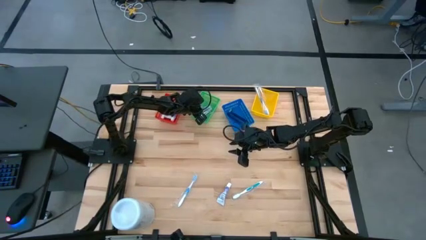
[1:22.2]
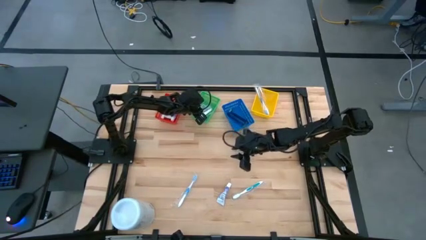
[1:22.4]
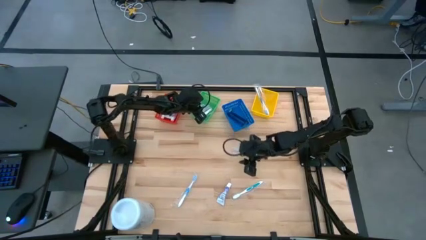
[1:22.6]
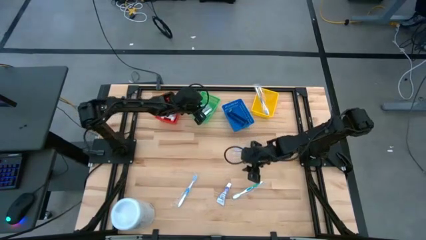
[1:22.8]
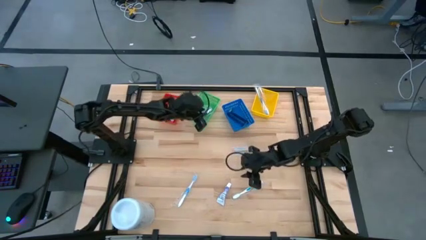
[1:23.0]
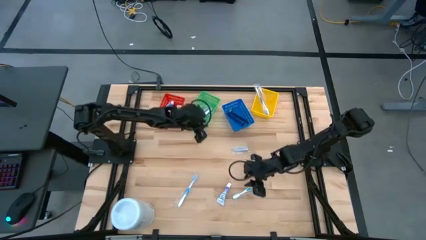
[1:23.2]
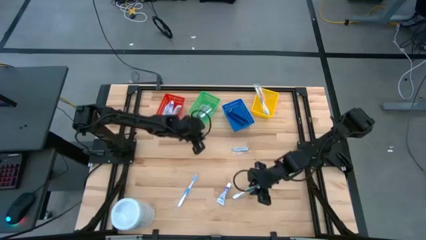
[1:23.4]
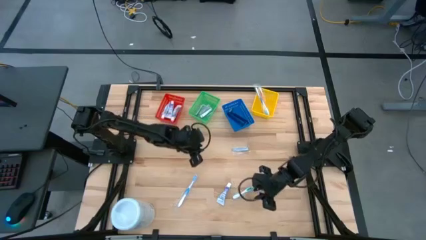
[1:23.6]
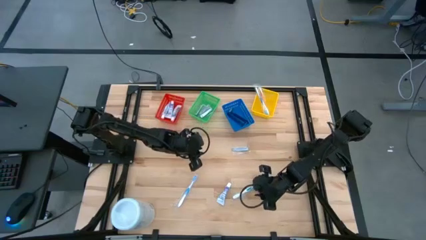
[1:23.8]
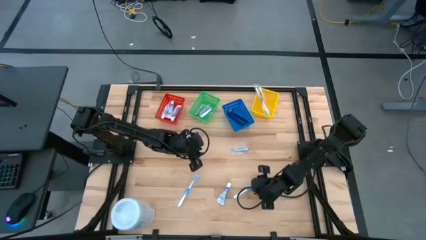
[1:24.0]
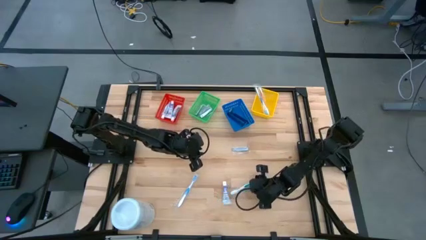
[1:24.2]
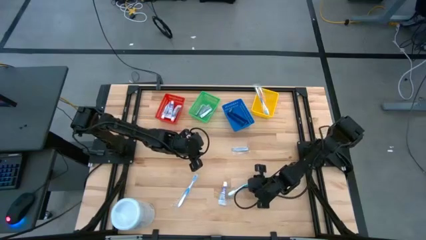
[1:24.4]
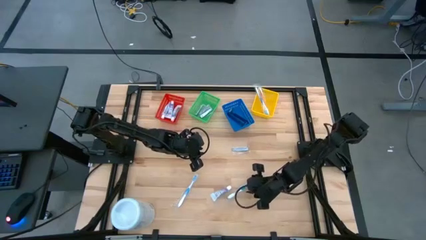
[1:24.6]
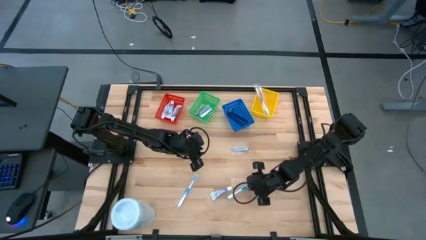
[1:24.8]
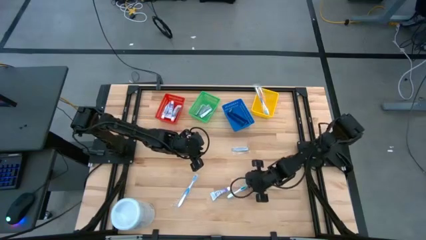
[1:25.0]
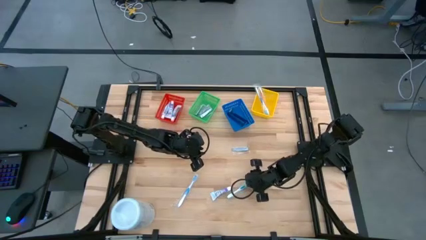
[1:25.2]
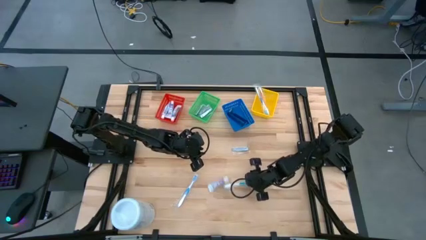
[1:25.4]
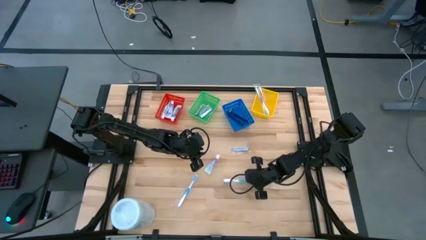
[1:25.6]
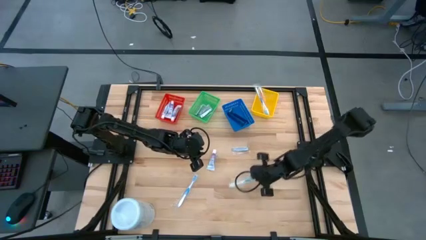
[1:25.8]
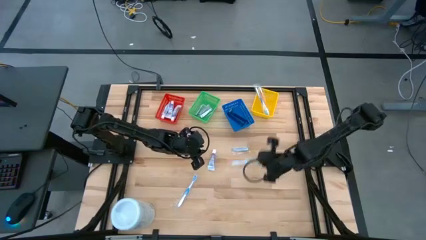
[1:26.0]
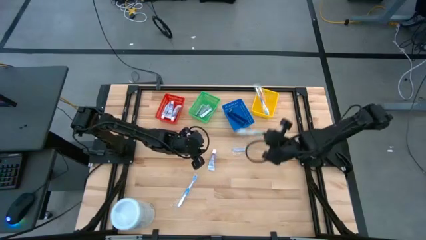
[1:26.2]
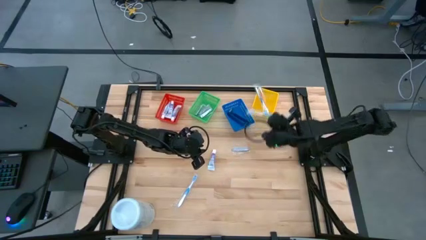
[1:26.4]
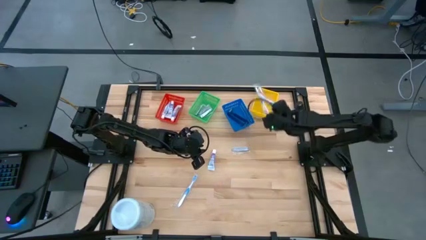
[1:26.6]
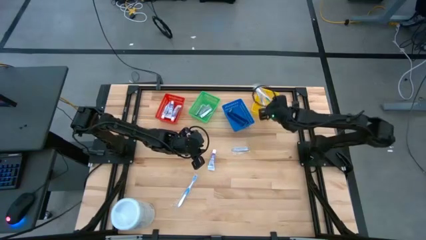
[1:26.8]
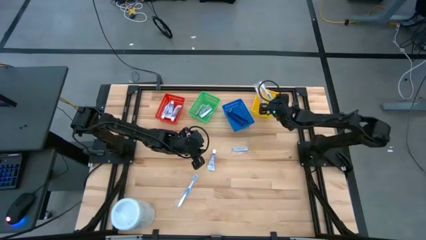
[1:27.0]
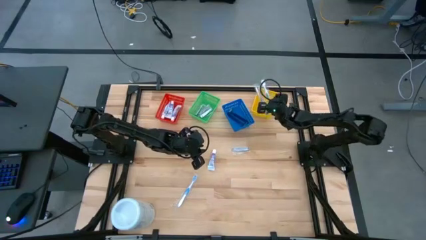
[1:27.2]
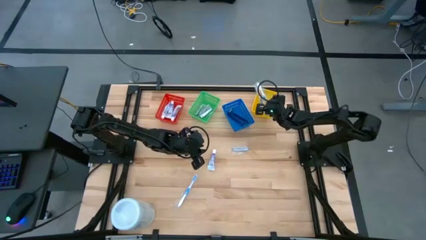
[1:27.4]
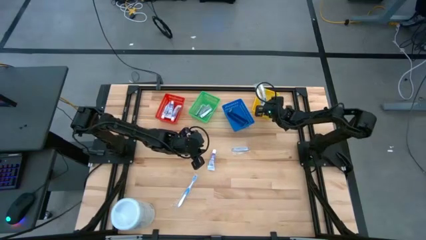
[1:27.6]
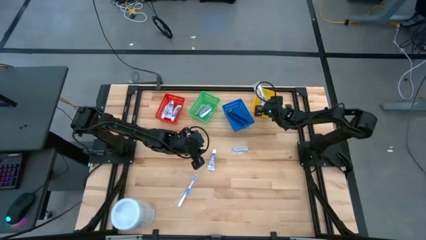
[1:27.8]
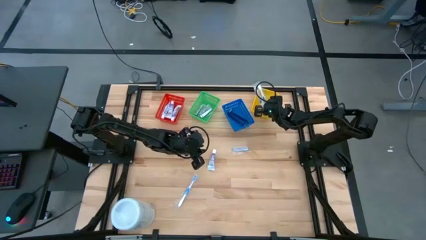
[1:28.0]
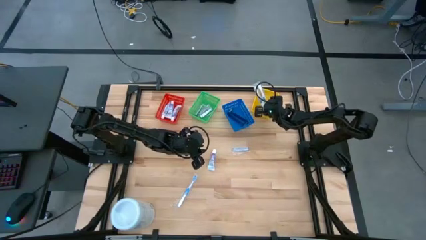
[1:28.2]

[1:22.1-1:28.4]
Task: Pick & Place Travel size toiletries
Put the light blue toothbrush in the yellow bin

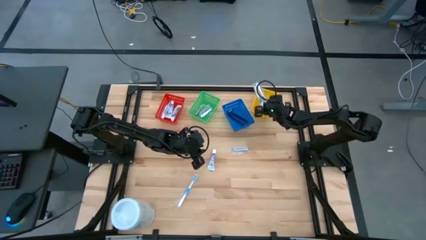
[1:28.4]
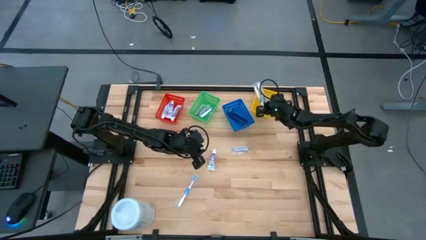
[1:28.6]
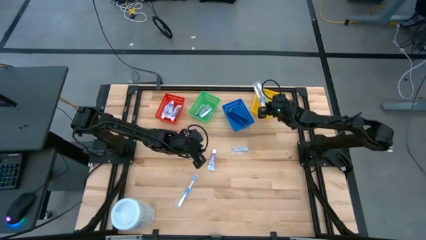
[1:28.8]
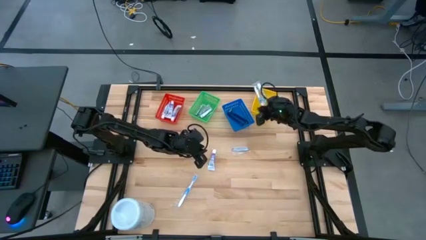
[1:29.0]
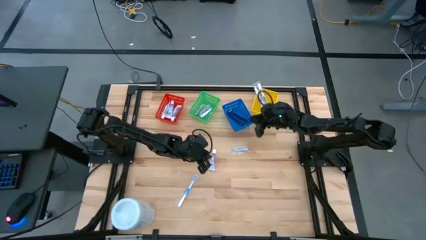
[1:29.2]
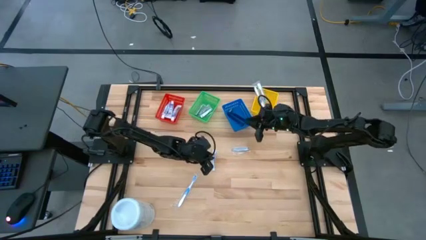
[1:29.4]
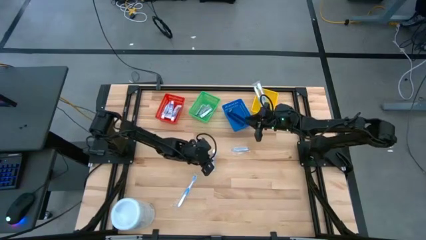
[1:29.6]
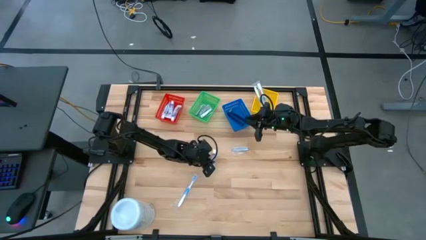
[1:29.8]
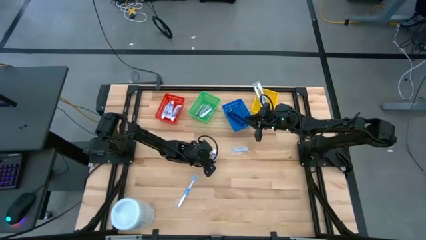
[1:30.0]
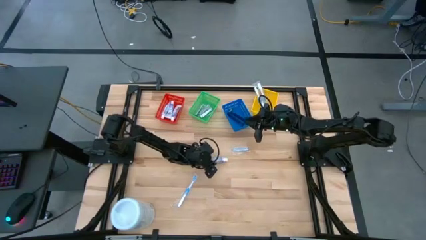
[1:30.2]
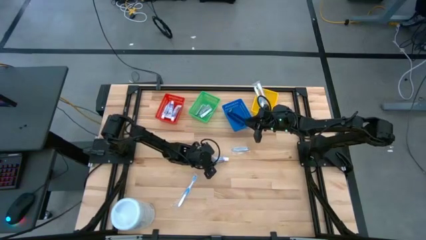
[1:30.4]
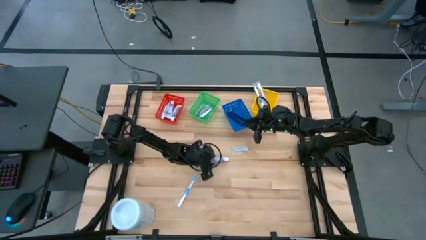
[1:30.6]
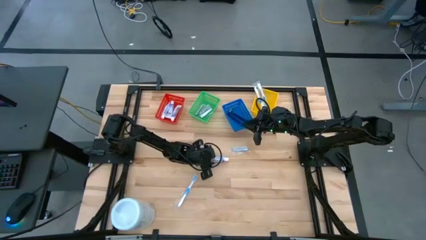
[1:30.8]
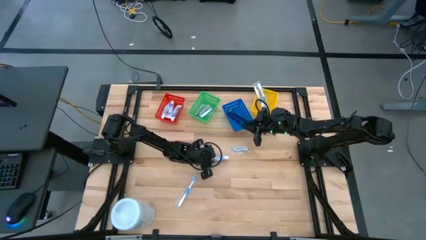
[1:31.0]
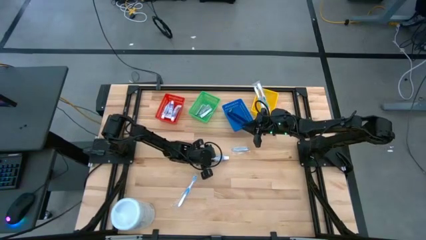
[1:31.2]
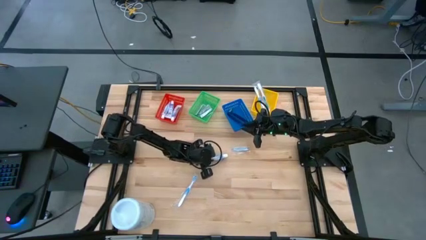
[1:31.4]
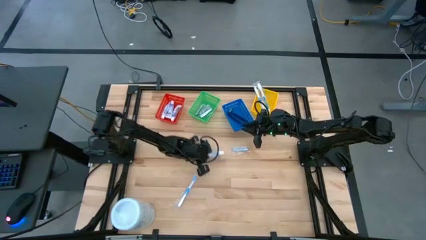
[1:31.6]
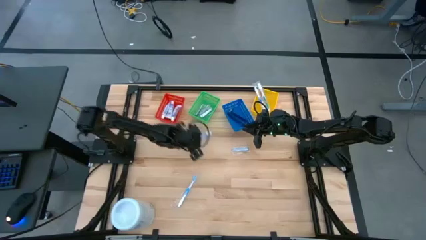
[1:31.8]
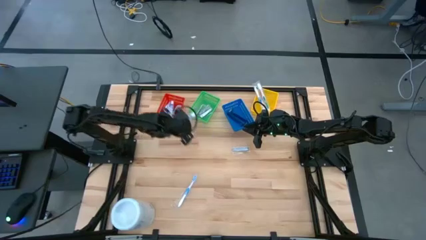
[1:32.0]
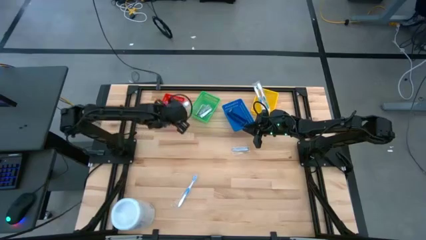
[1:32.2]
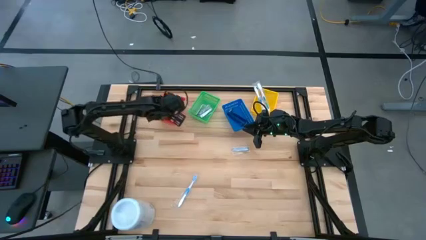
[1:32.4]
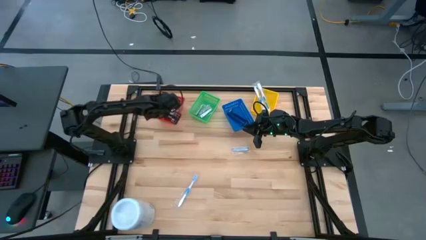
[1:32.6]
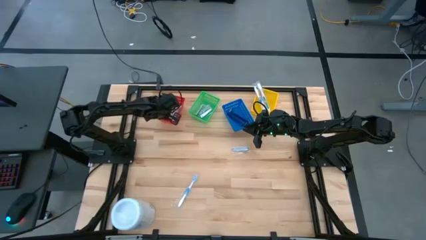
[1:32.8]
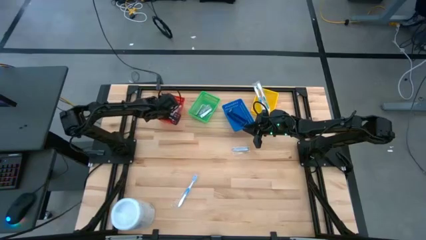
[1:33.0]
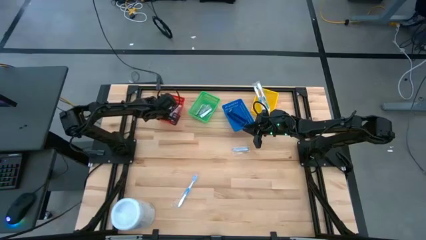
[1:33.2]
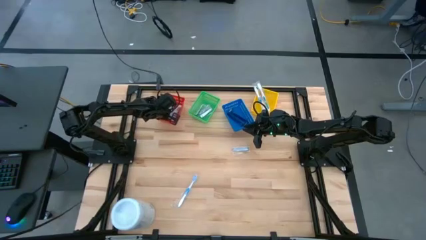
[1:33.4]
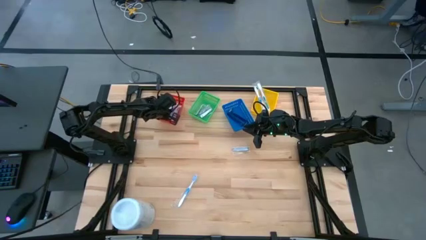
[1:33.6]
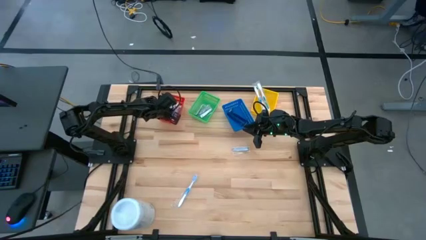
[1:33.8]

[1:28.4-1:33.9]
Put the white toothpaste in the red bin

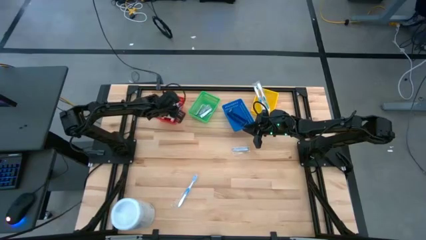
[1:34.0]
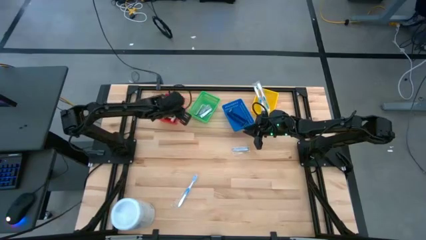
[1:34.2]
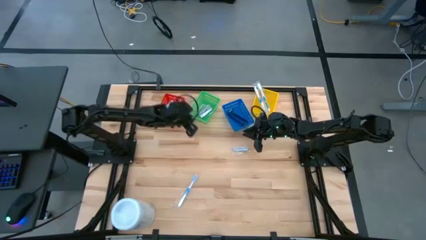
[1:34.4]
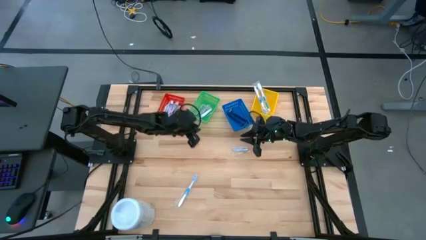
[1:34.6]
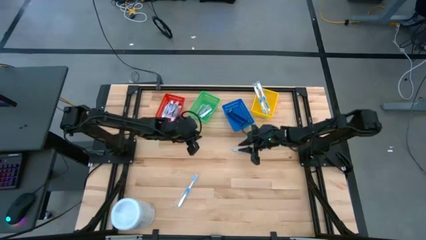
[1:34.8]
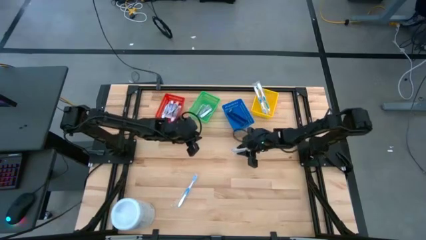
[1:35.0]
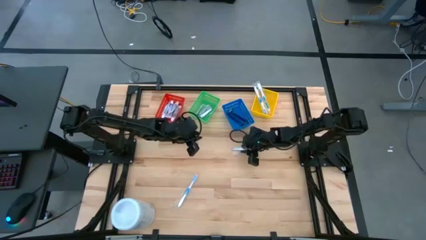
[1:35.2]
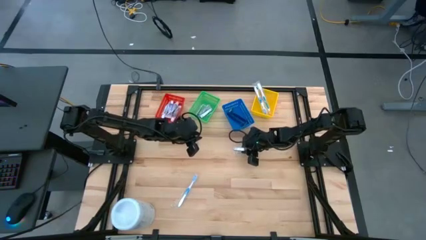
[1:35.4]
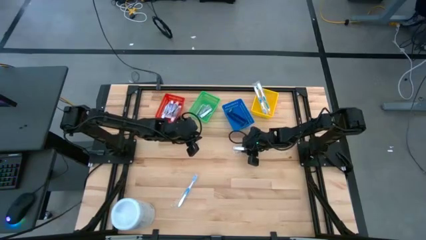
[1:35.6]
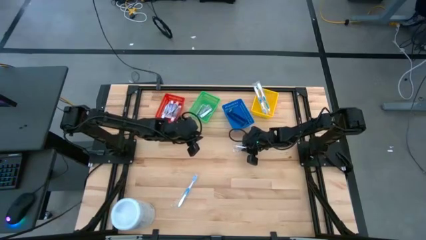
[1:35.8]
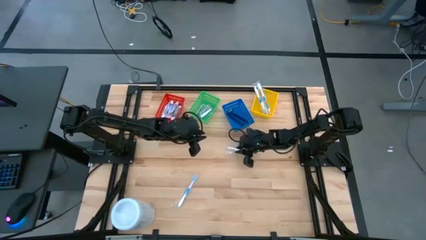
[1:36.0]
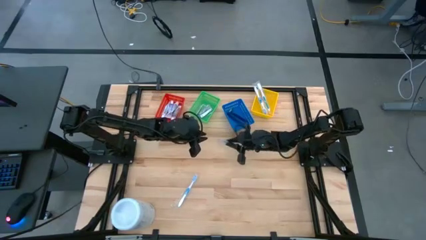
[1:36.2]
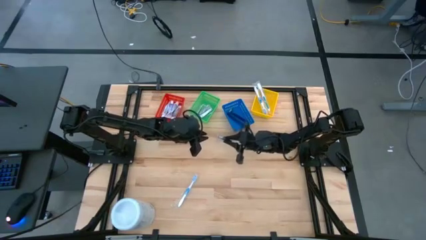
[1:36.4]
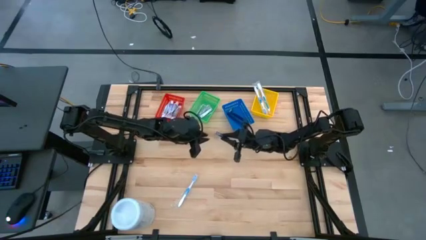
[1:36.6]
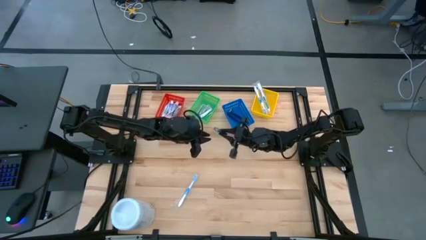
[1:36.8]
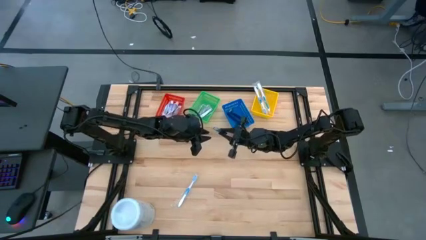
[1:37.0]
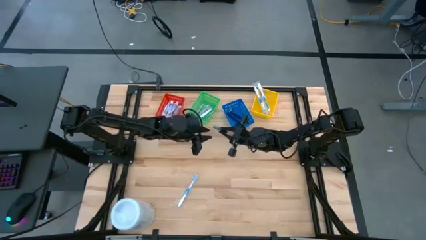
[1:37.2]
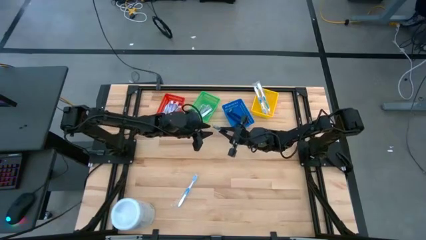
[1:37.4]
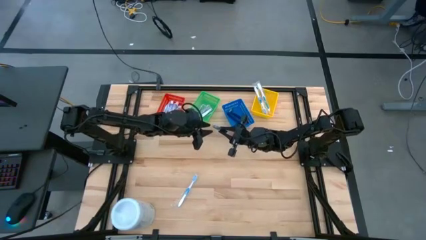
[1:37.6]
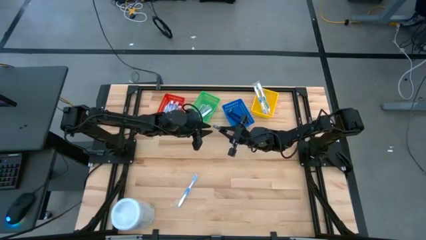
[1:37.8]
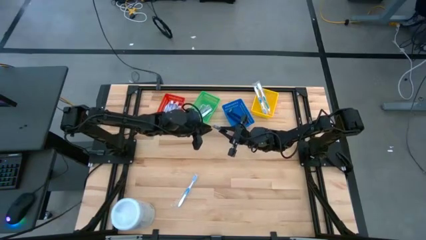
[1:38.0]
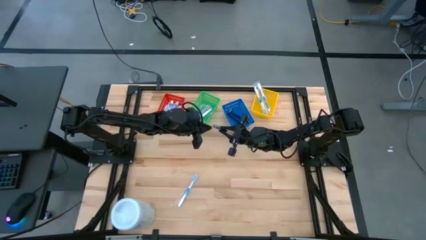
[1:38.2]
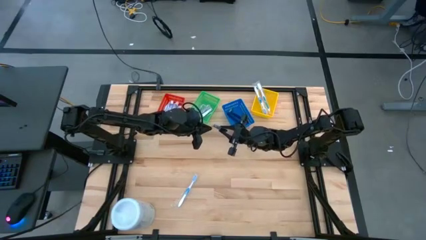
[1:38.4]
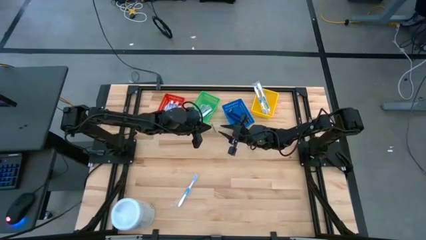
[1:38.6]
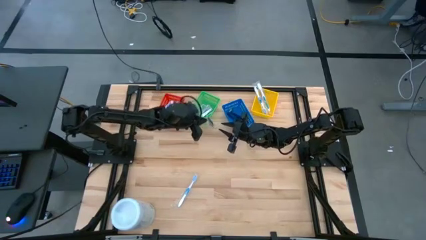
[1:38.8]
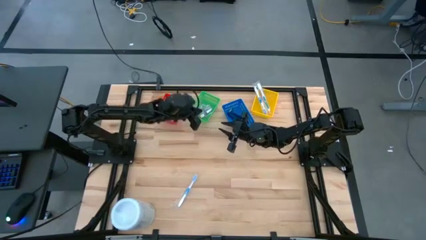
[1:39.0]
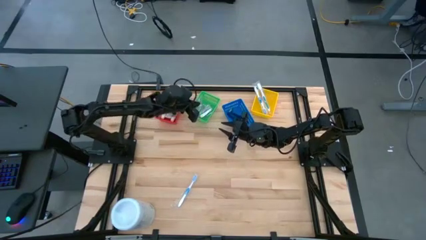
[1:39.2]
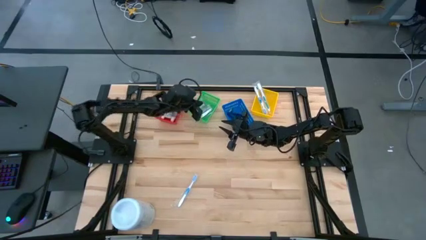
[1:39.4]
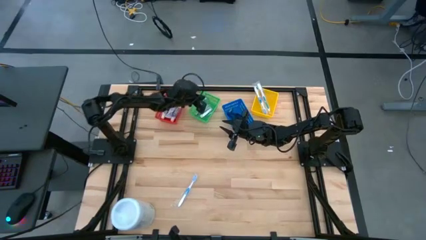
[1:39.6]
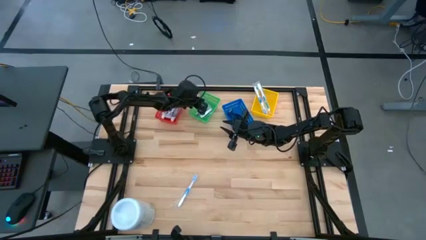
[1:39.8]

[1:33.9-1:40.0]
Put the silver nail cutter in the green bin
